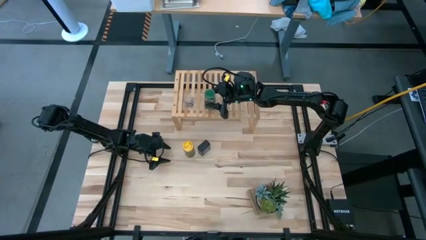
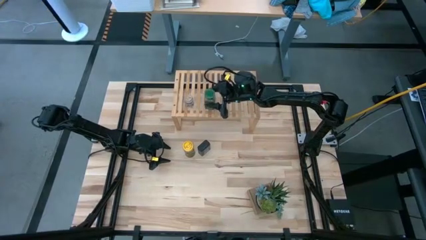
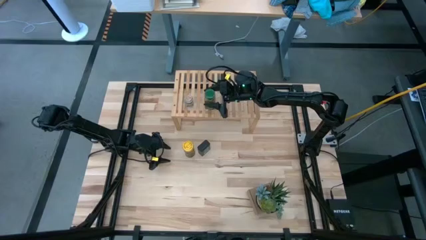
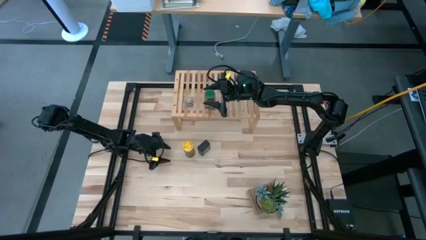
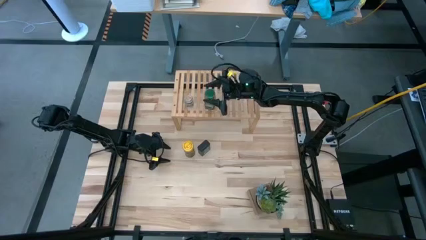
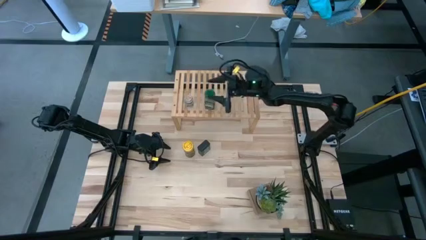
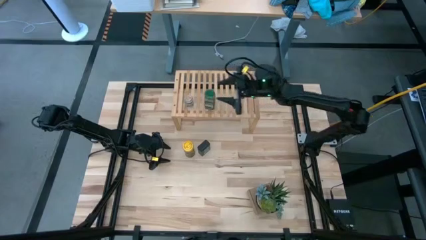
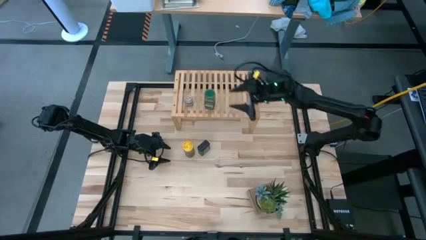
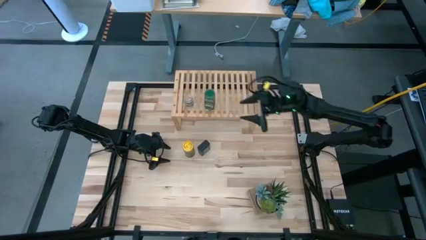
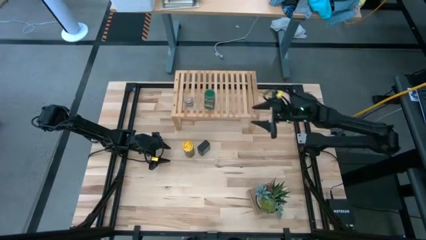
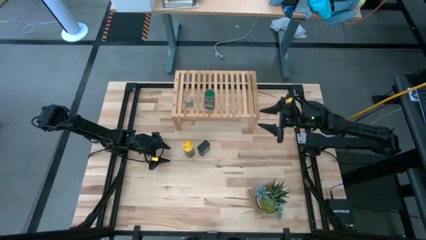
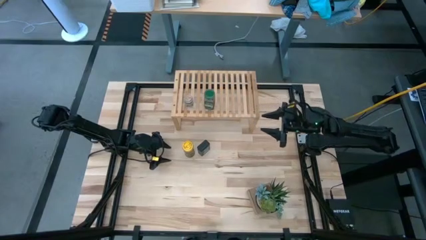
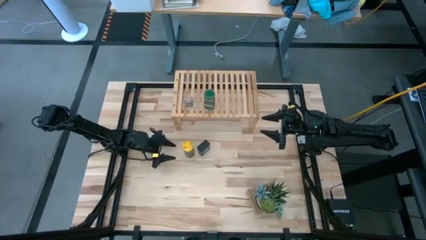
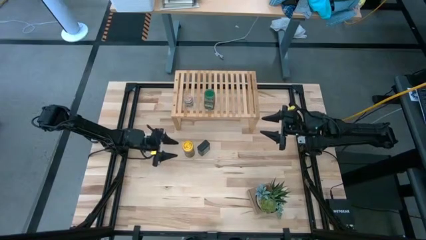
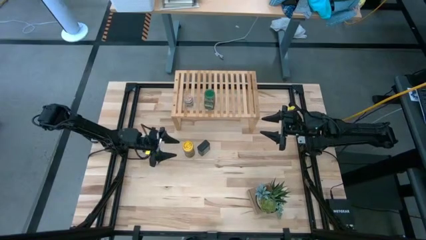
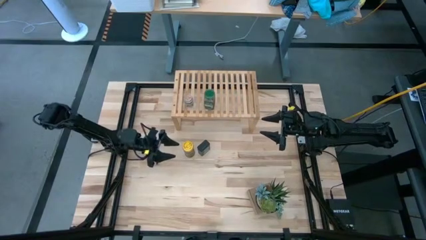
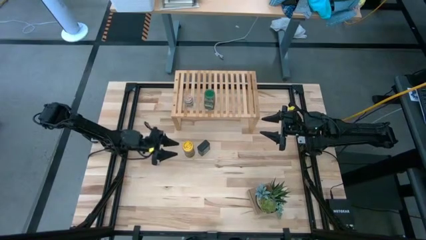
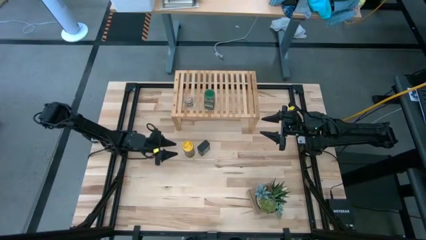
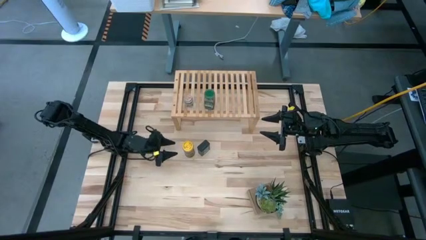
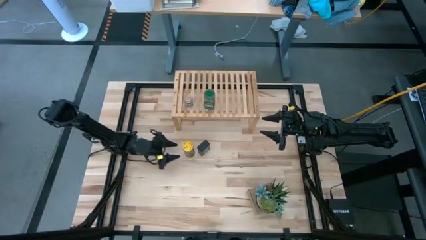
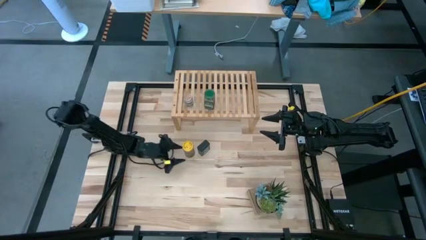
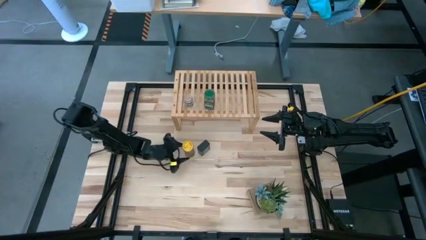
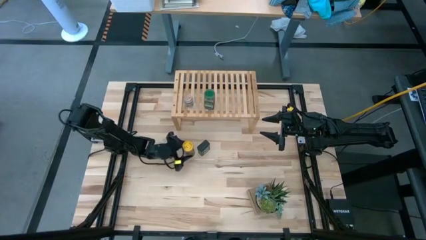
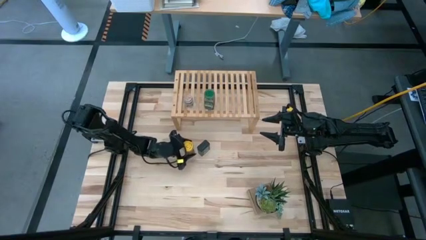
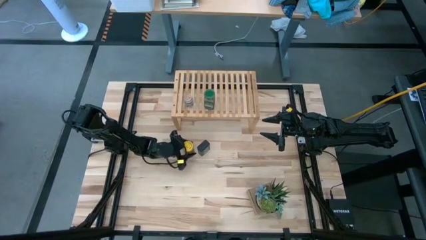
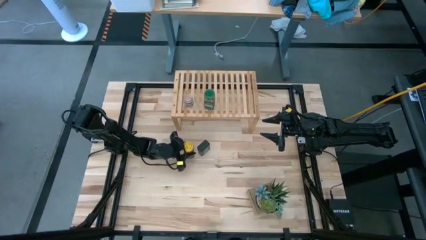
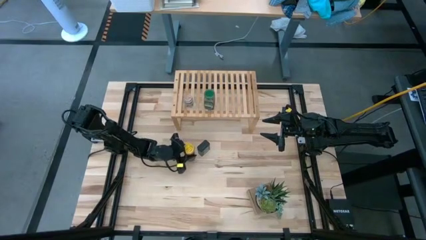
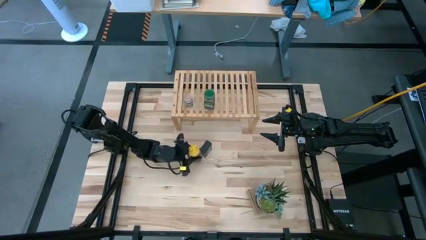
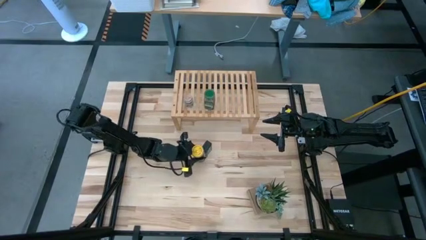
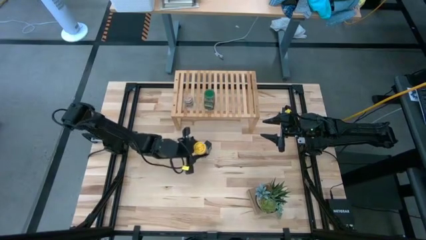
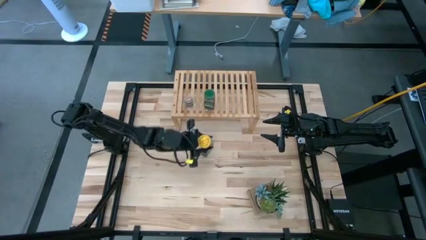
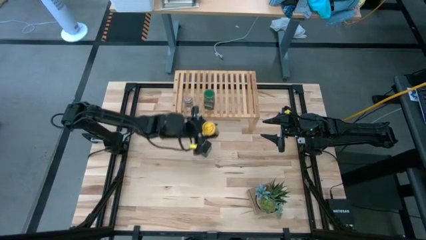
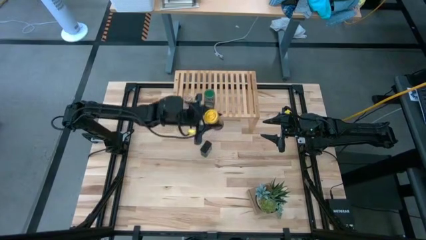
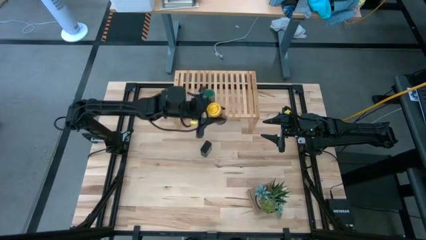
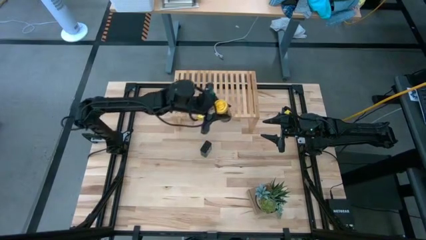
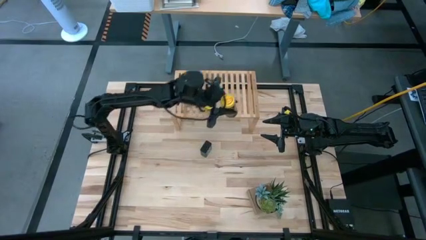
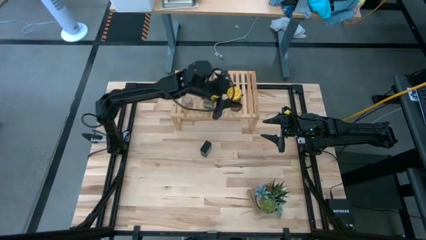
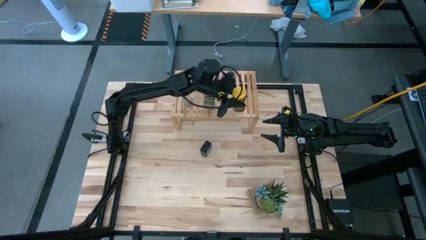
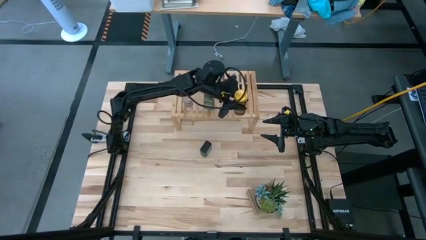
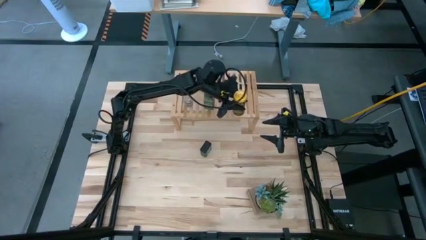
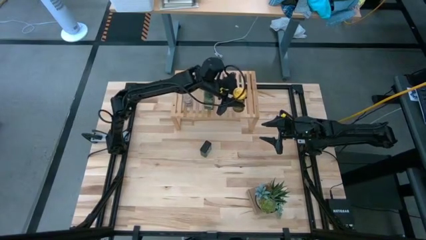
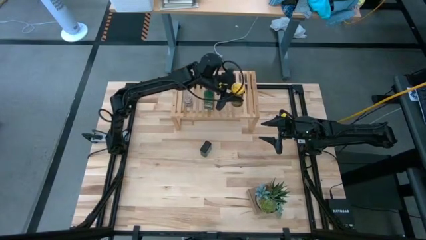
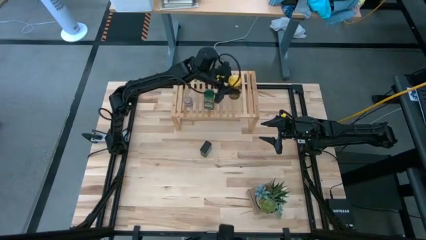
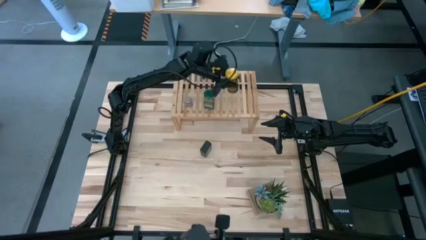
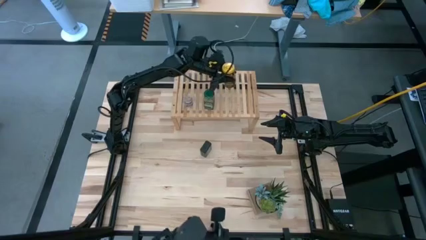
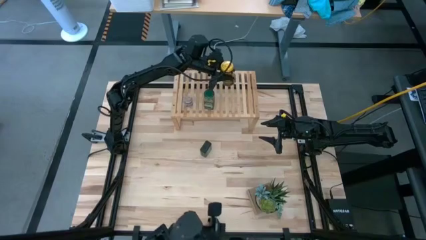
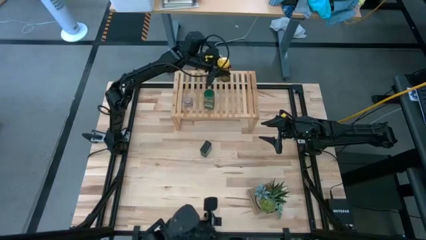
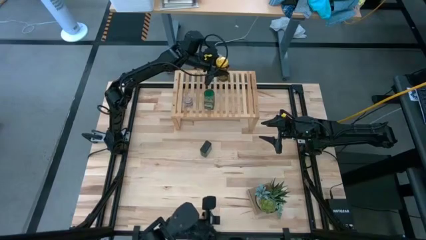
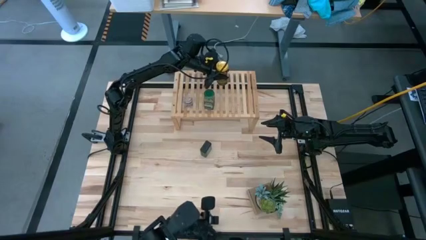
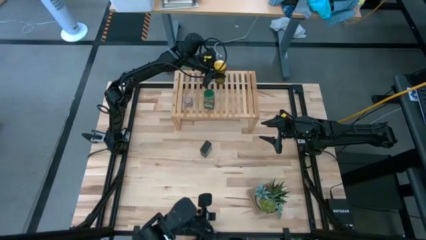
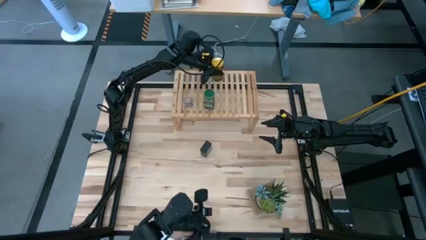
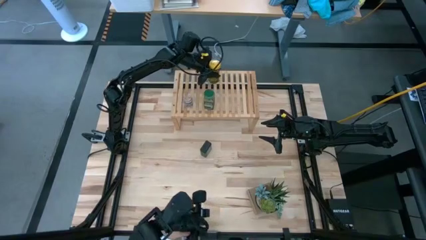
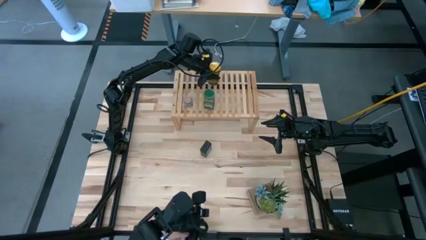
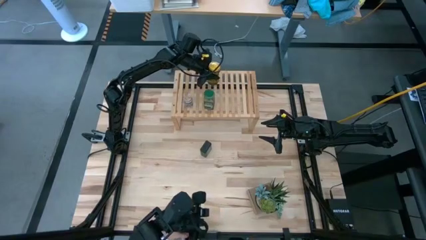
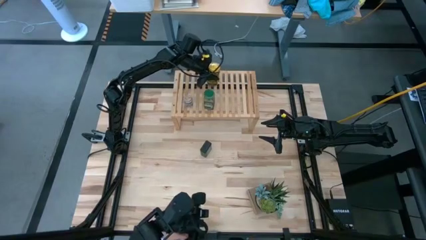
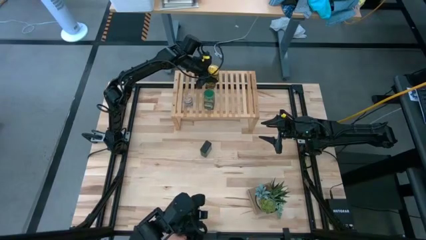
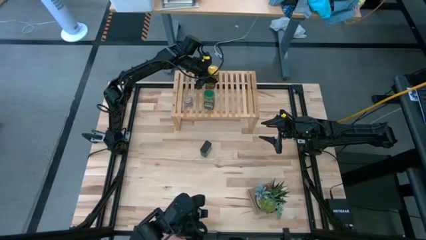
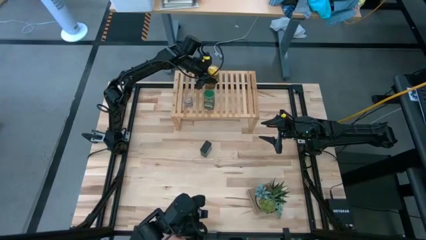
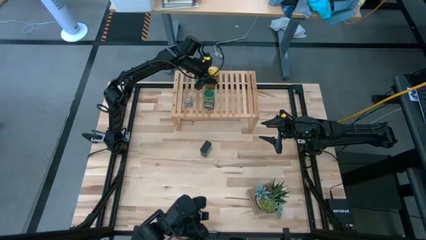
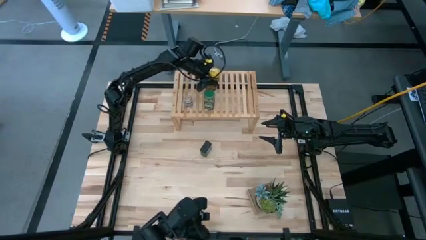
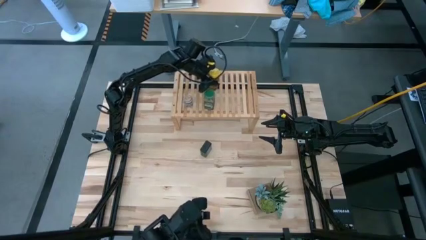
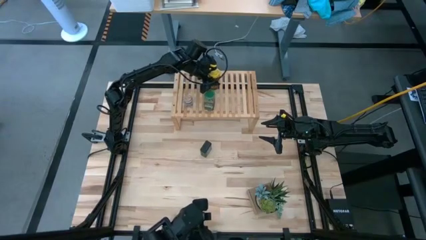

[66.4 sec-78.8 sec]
Task: Shelf spices
Put the yellow seasoning bottle on the shelf

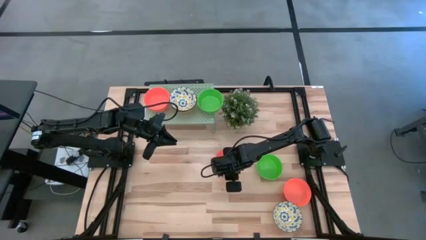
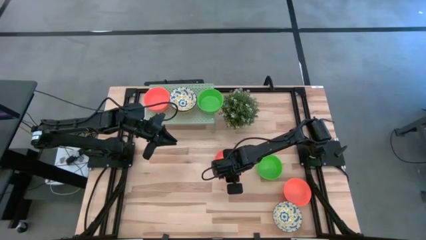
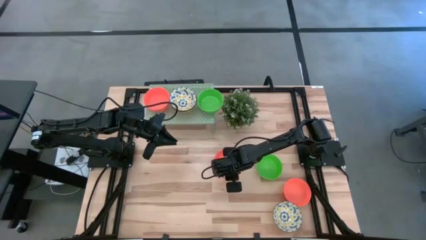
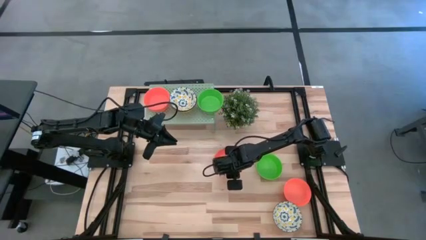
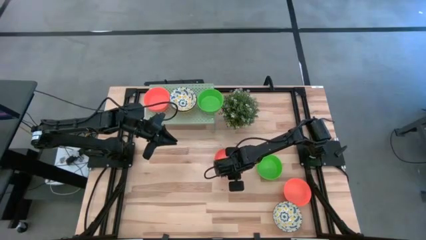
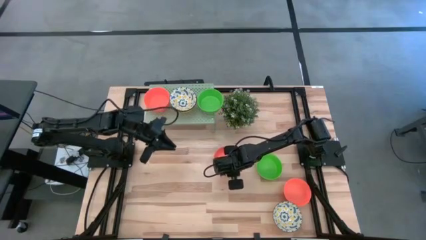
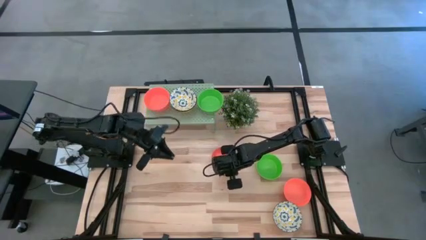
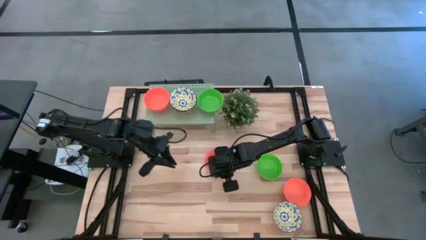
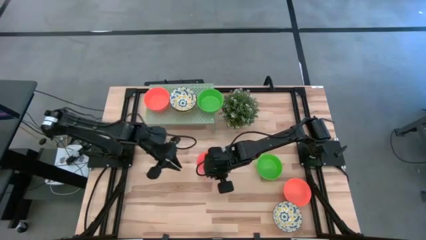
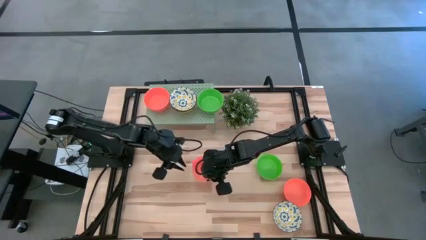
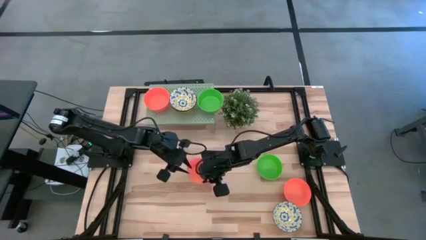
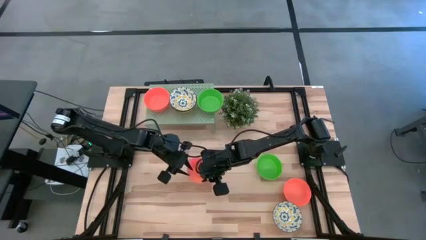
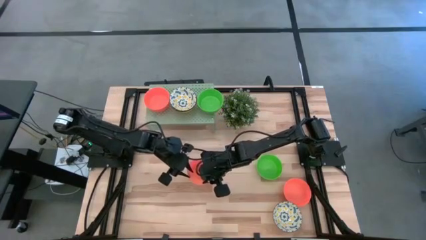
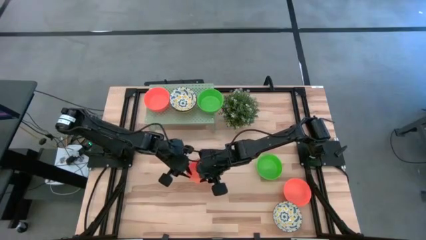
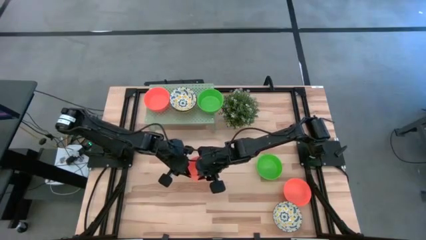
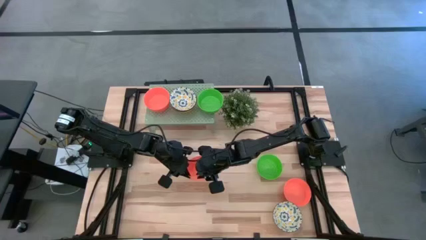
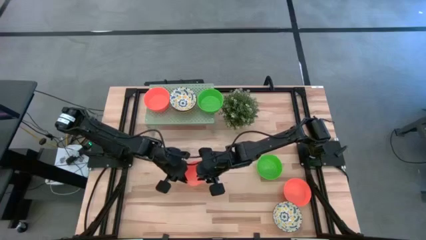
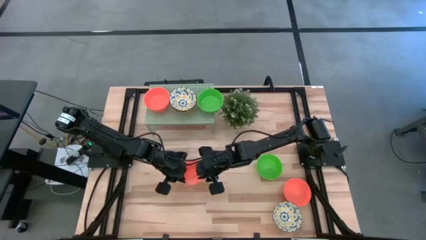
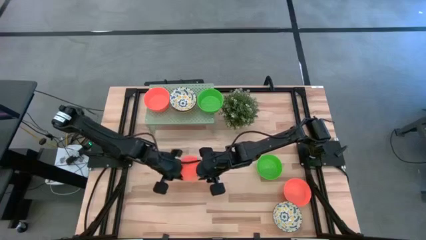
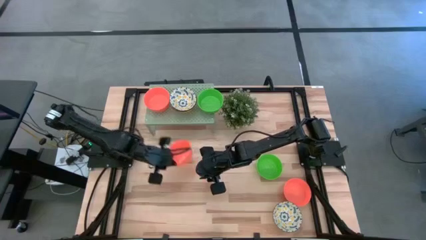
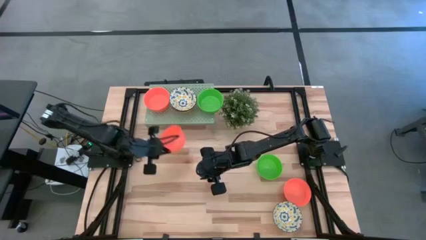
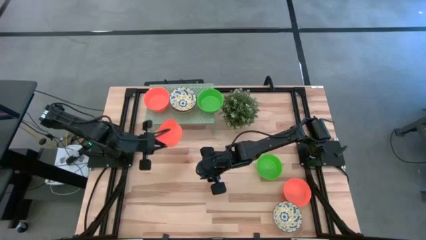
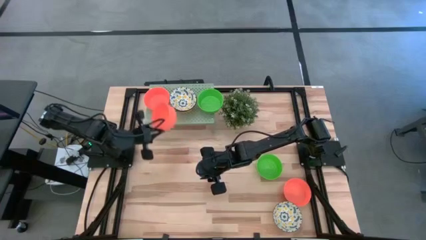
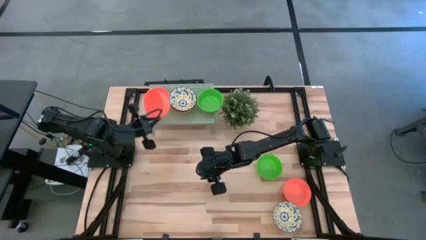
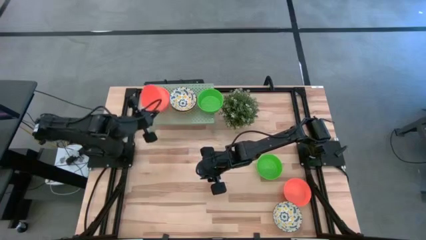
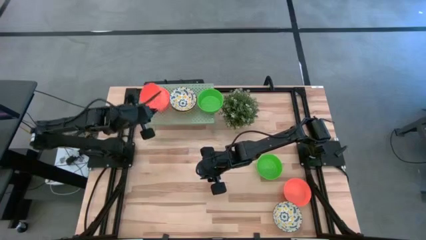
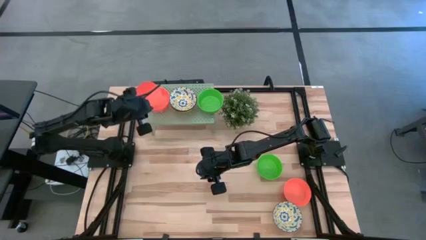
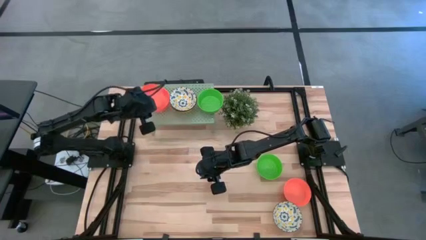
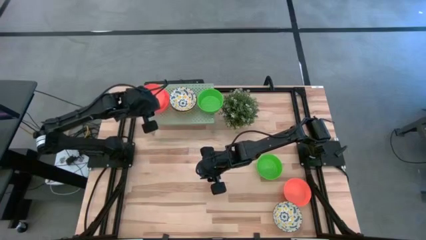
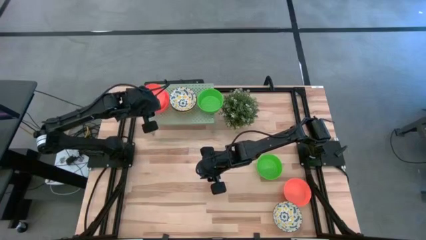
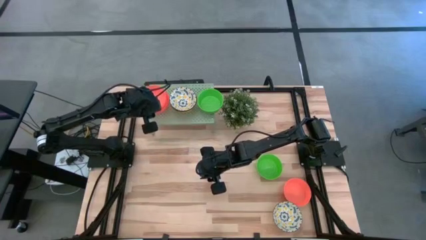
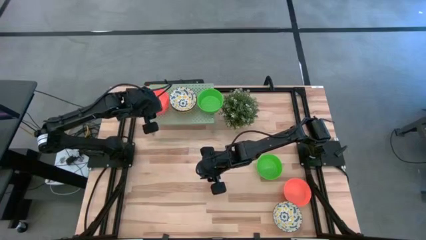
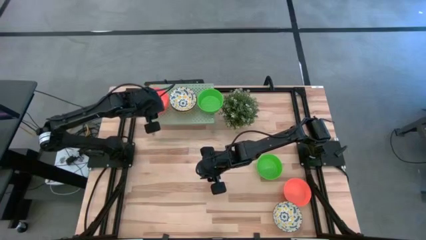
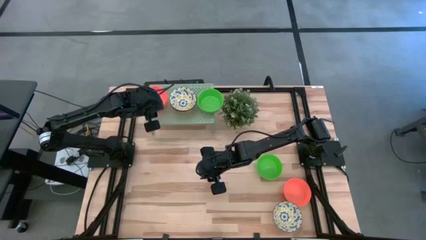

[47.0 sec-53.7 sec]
Task: Pick & Place Mini bowls
Stack the orange bowl on top of the stacked orange bowl on the shelf
